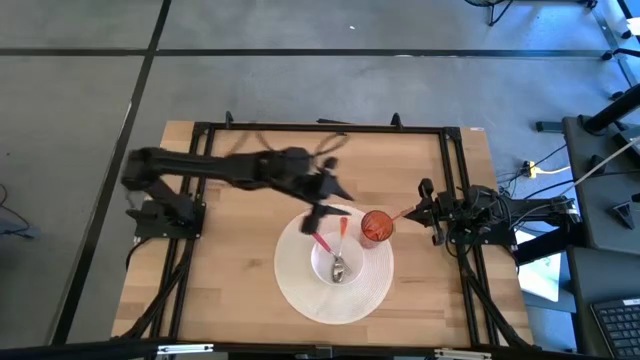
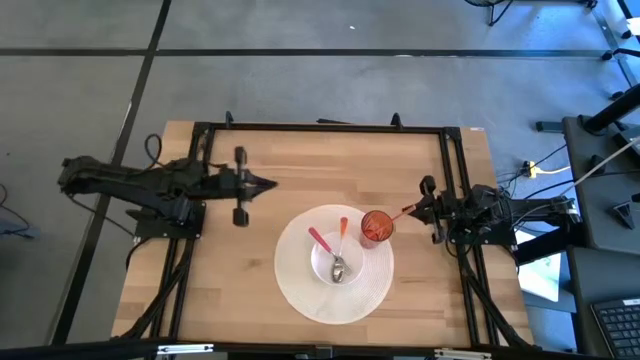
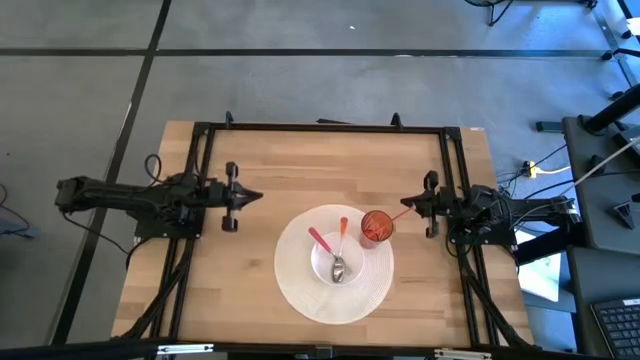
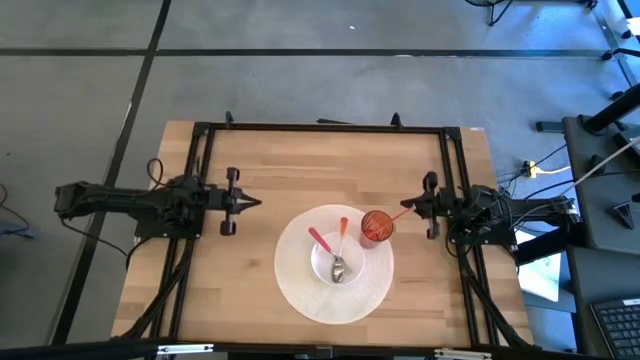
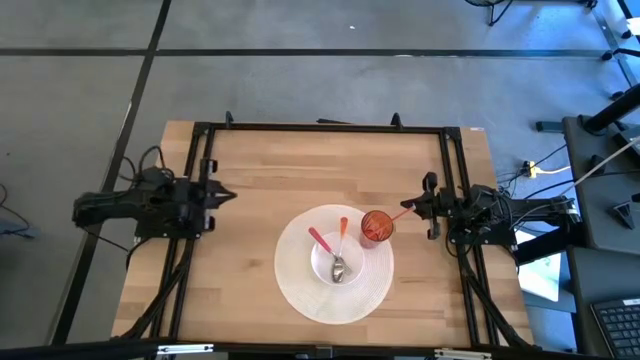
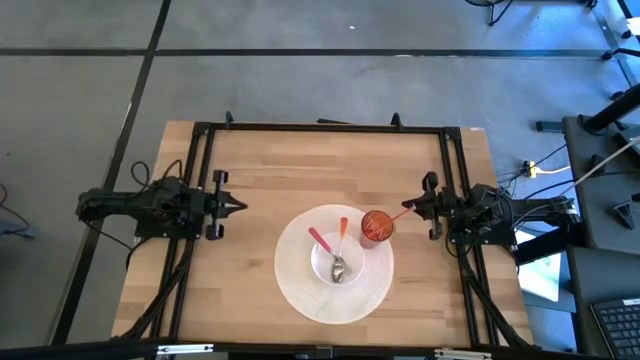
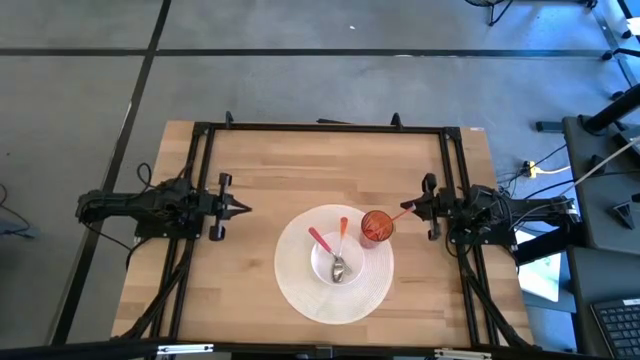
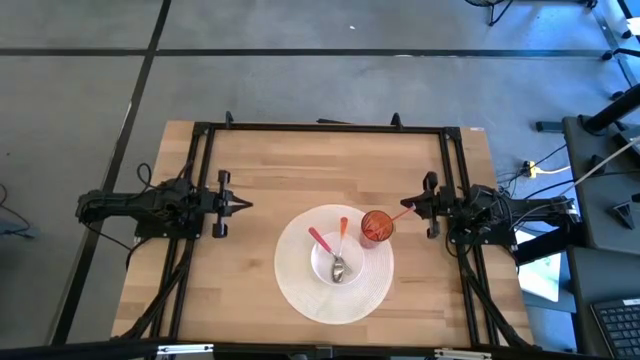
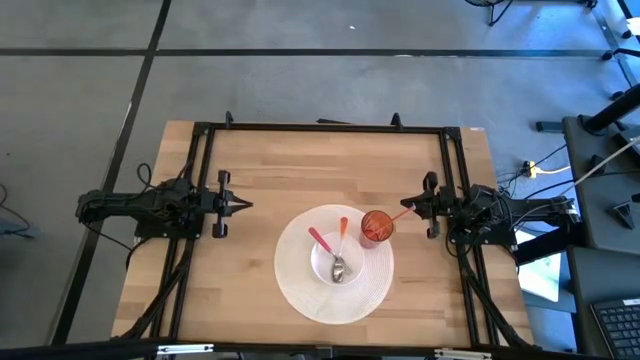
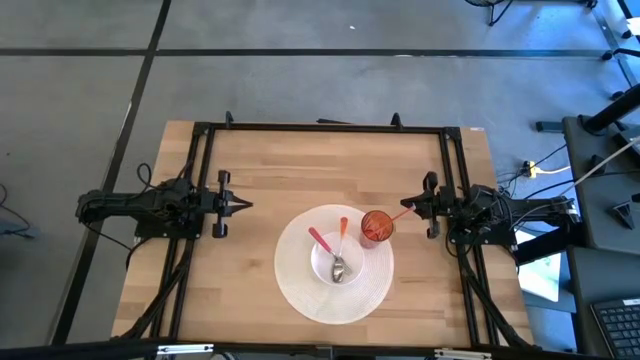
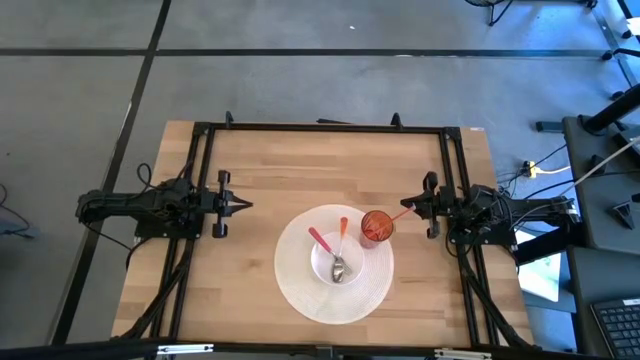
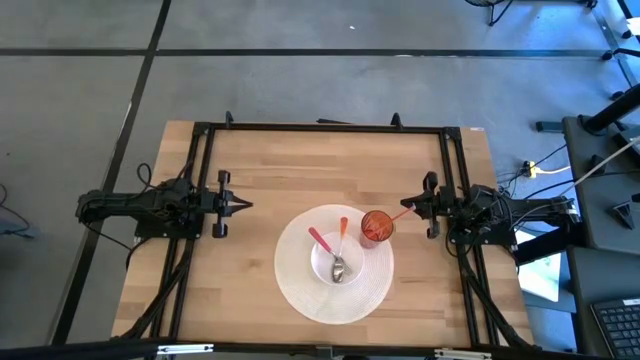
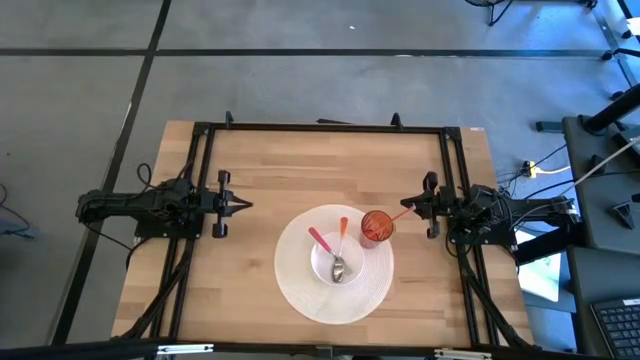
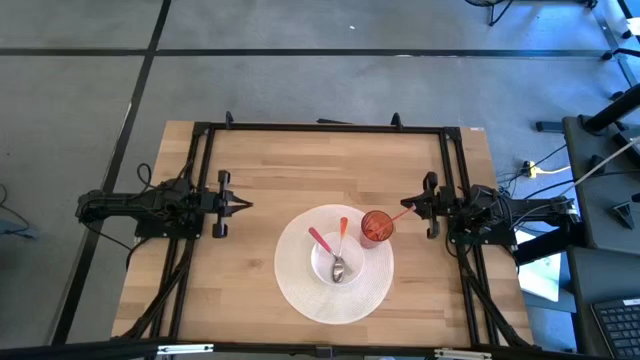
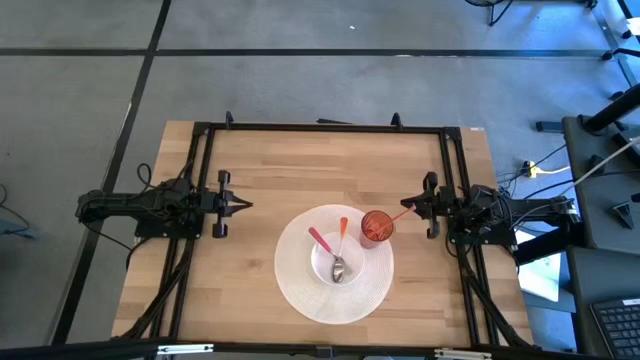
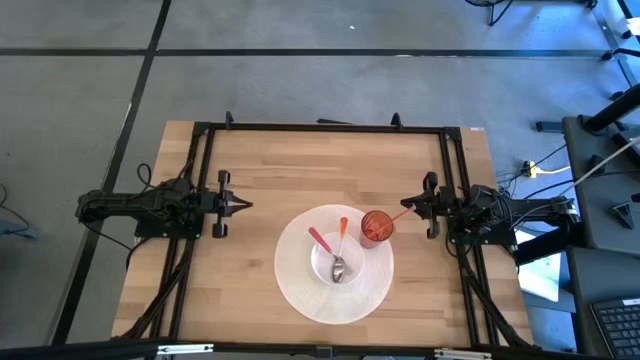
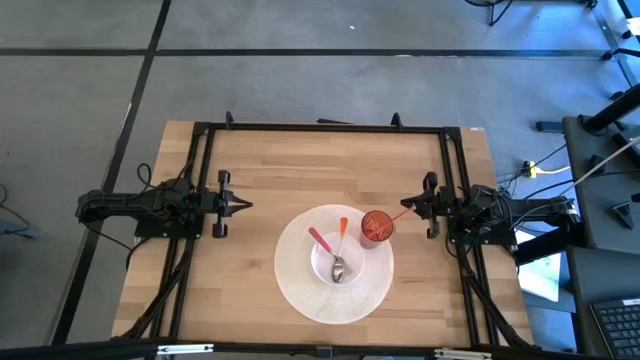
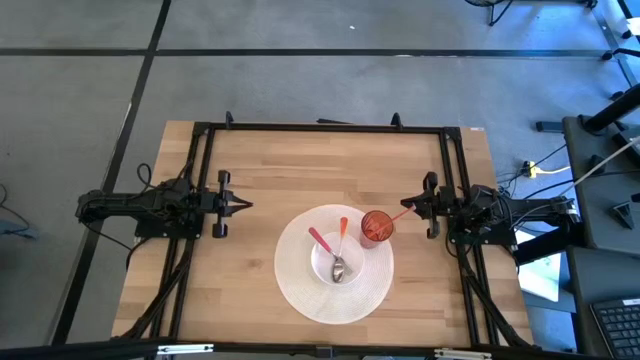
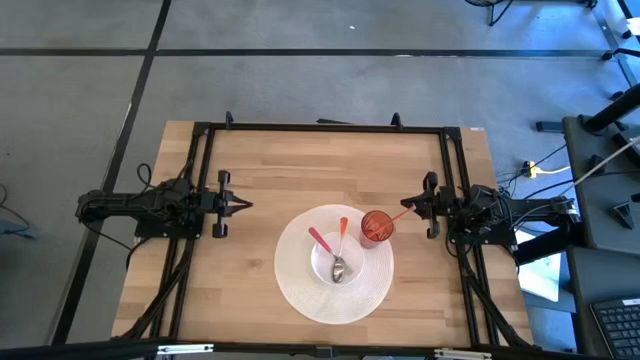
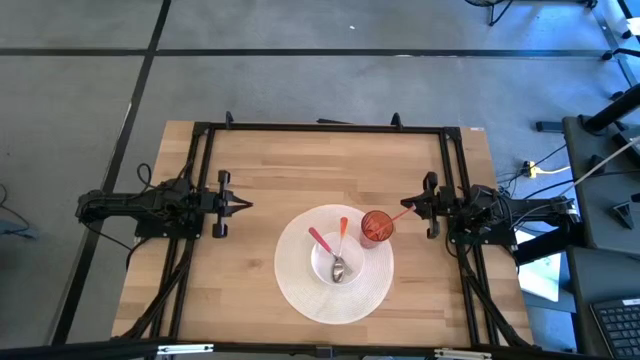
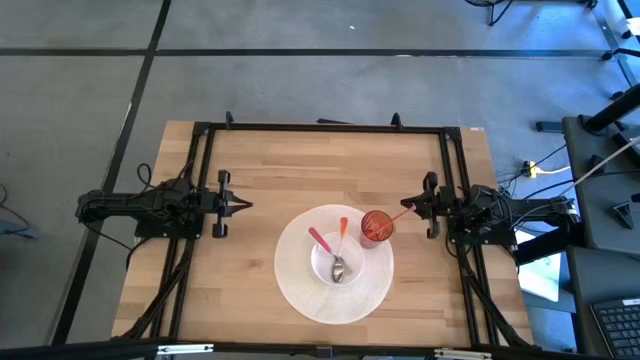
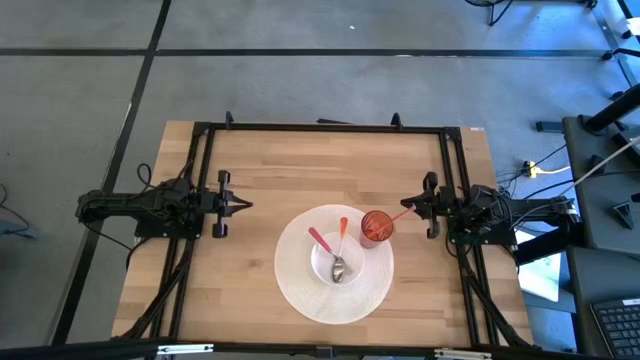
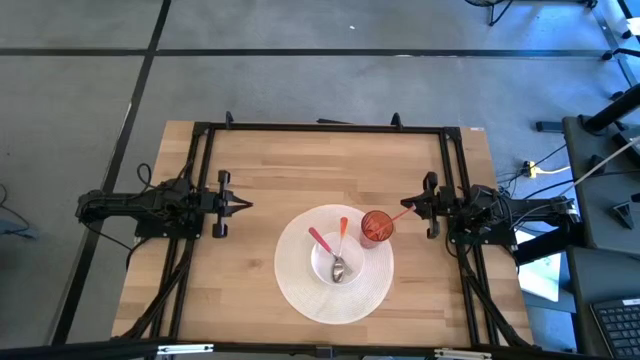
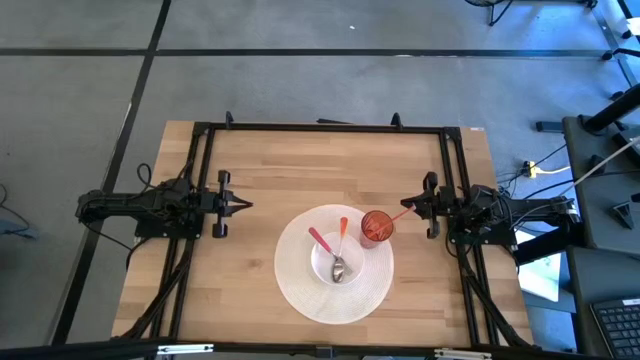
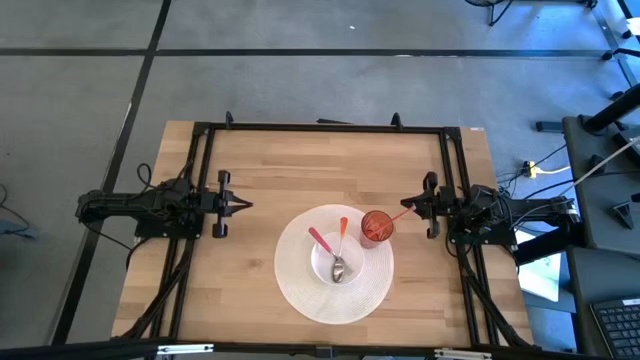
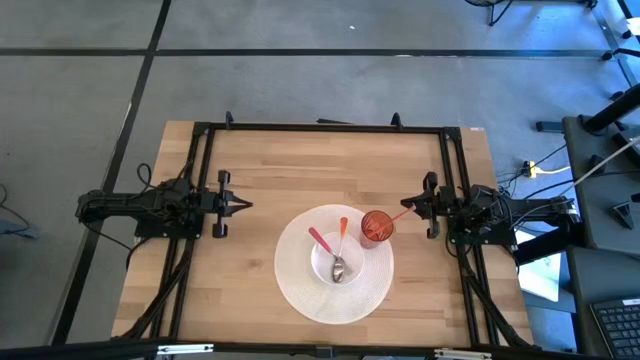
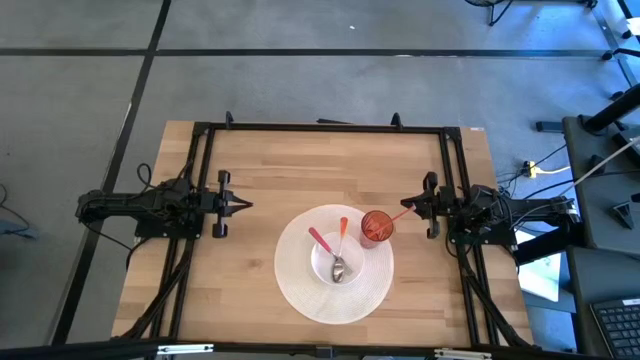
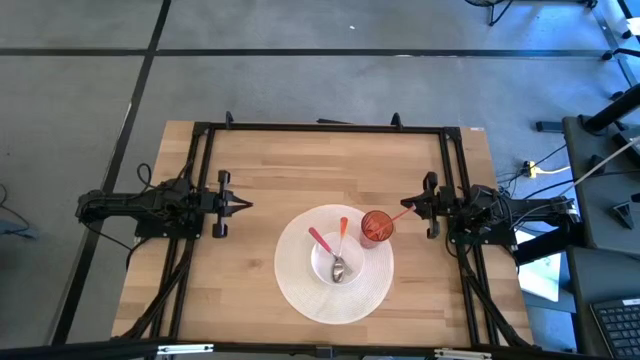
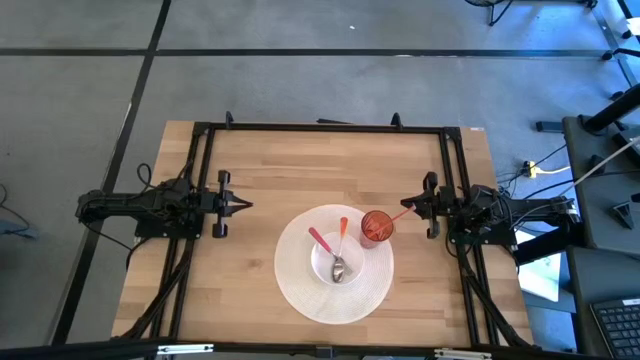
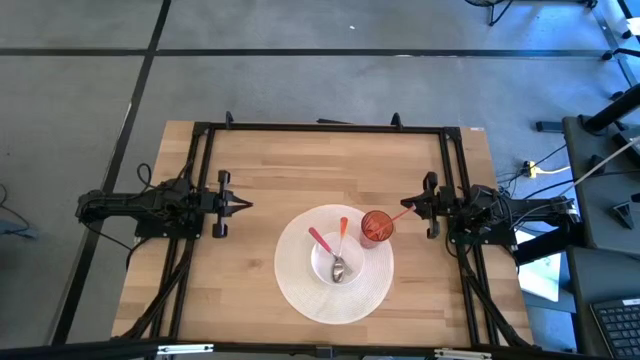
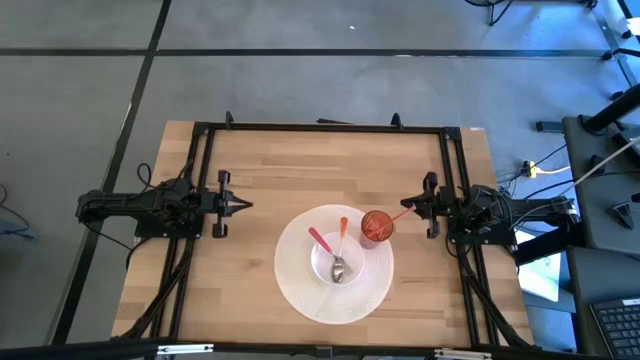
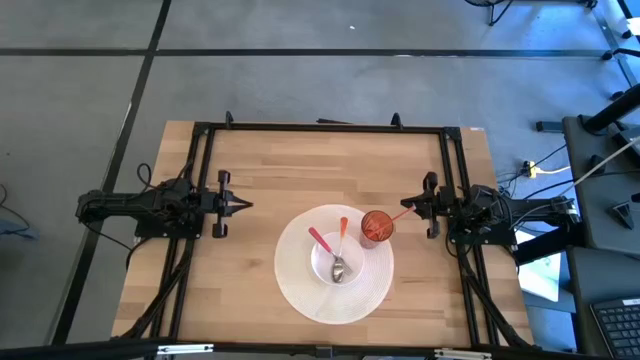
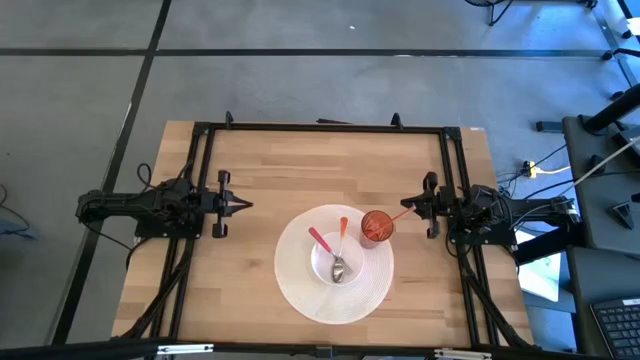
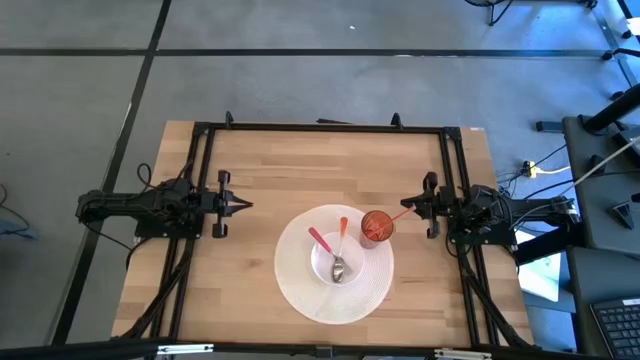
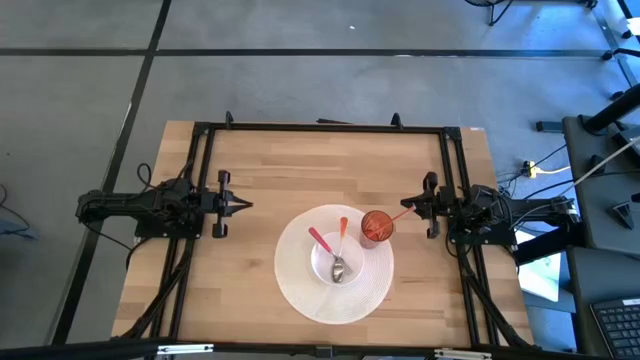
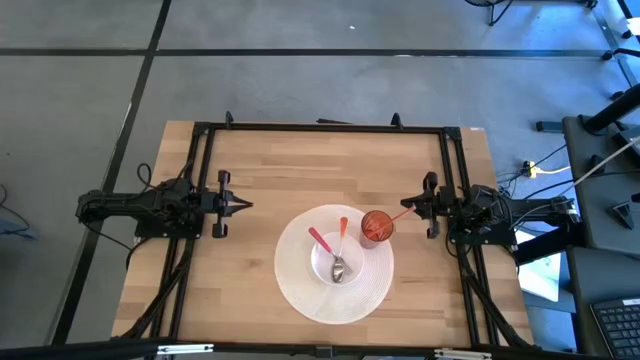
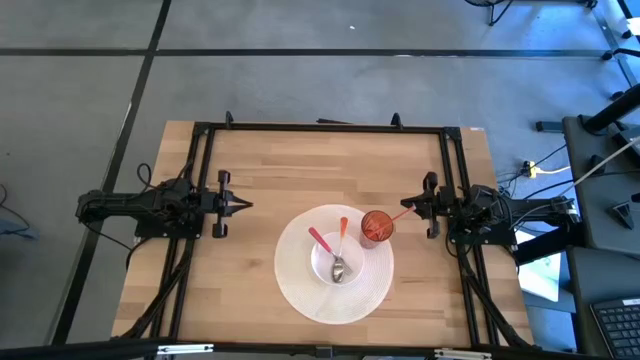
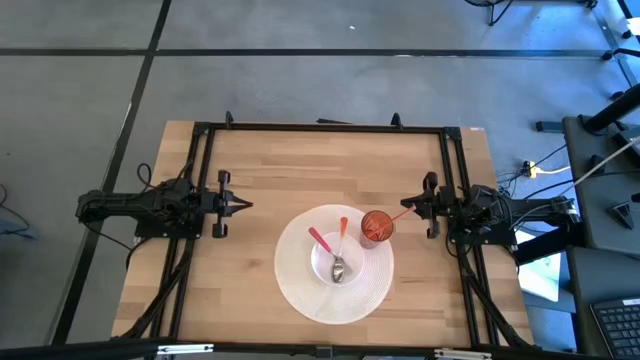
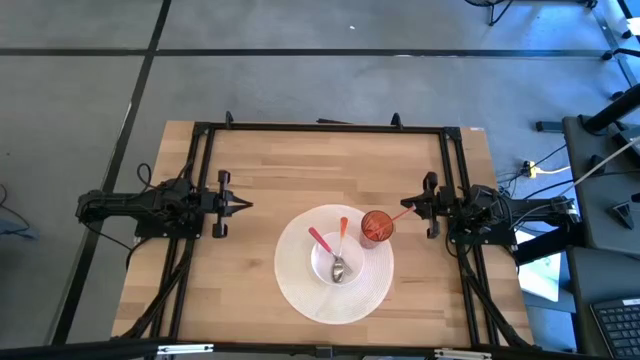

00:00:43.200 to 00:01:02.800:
Task: Pick & Place Utensil
Return to Home Position

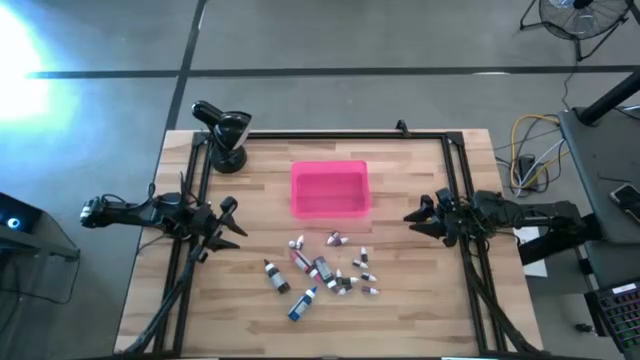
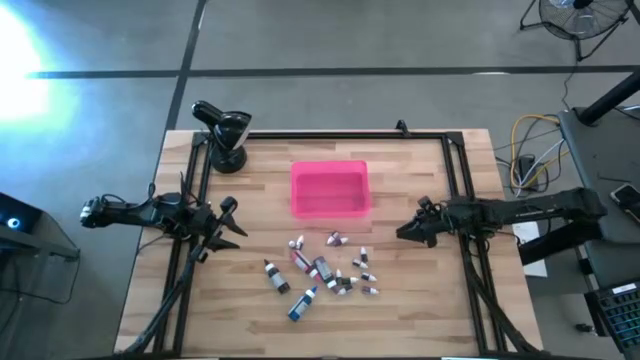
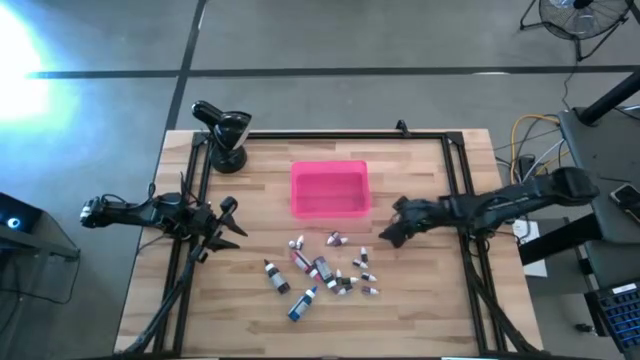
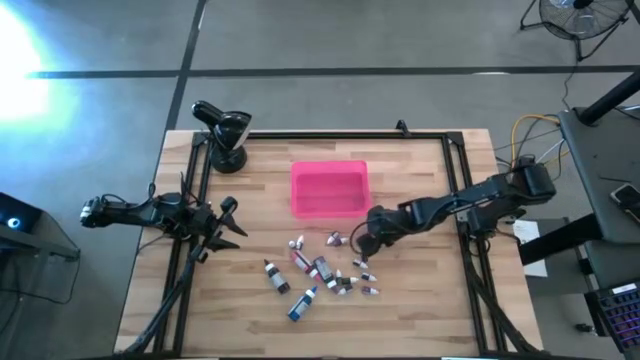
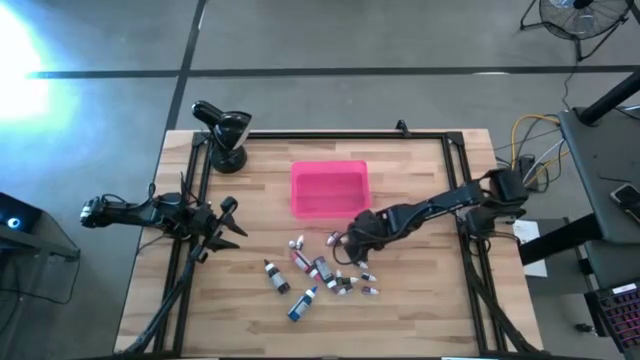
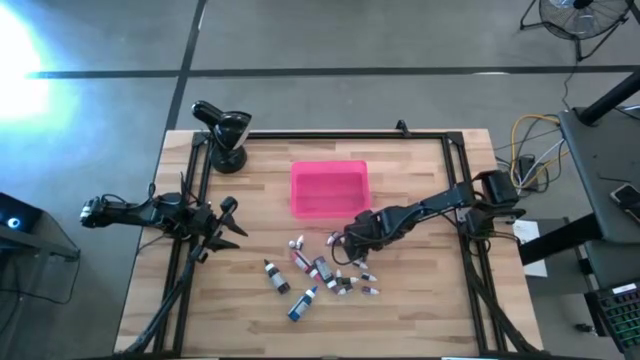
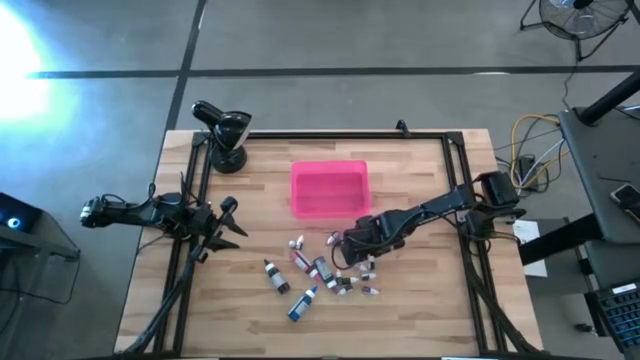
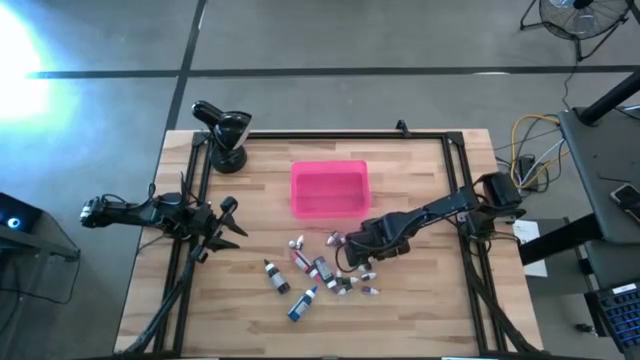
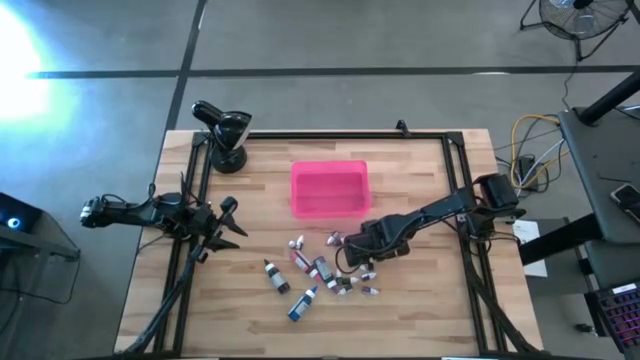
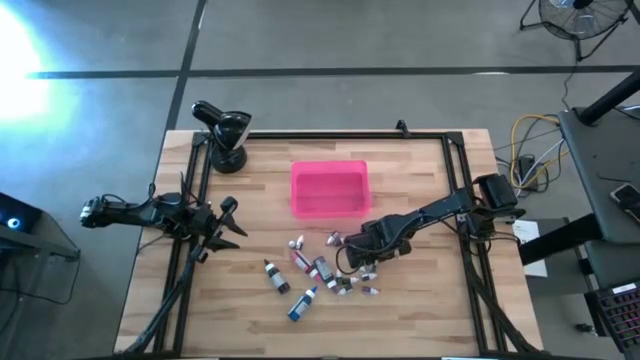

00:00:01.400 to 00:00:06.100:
Task: Pick & Place food coloring
Put the brown food coloring bottle into the pink bin
